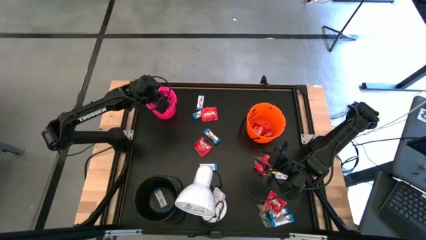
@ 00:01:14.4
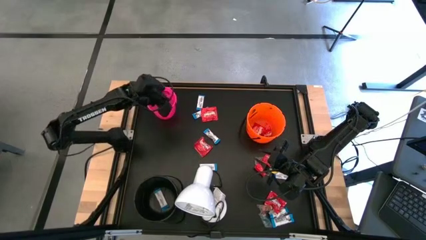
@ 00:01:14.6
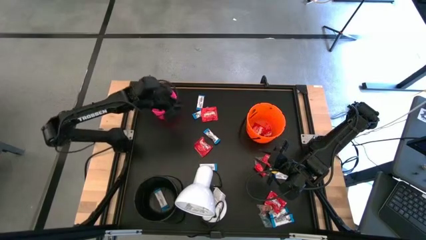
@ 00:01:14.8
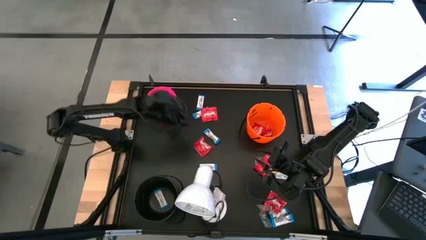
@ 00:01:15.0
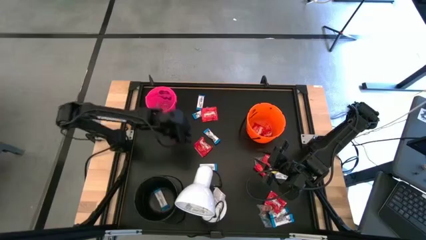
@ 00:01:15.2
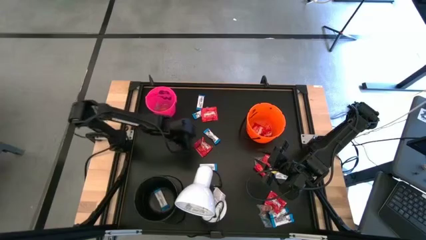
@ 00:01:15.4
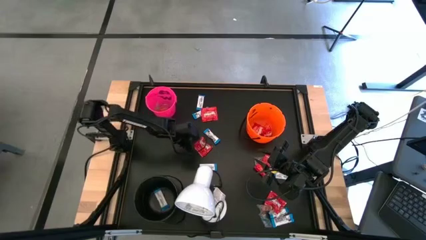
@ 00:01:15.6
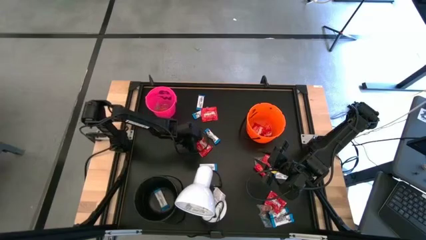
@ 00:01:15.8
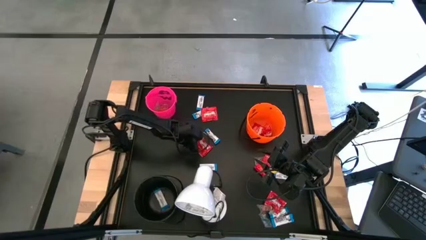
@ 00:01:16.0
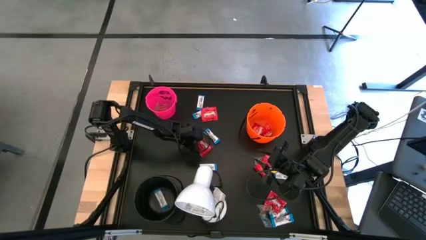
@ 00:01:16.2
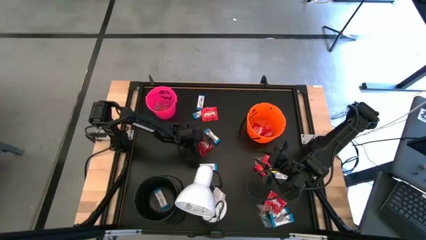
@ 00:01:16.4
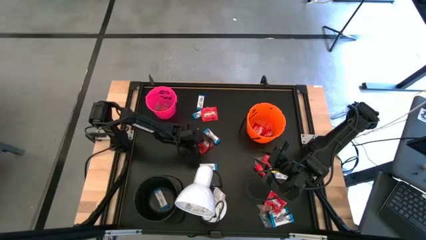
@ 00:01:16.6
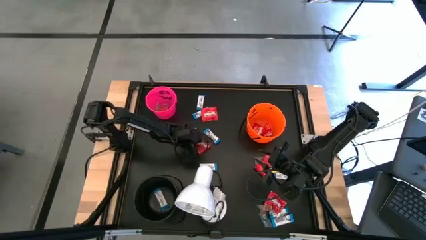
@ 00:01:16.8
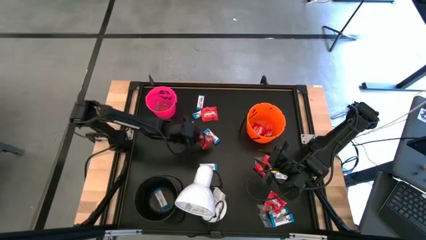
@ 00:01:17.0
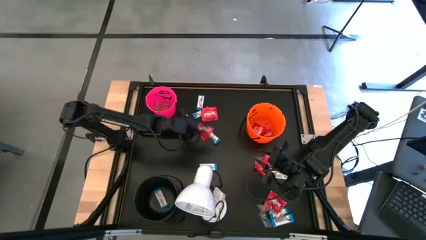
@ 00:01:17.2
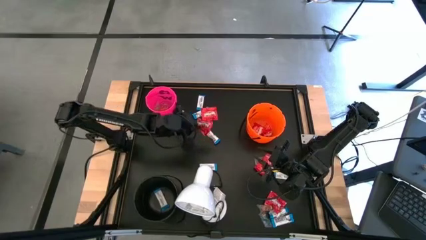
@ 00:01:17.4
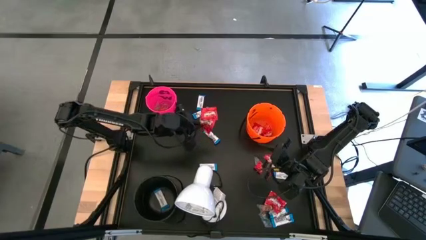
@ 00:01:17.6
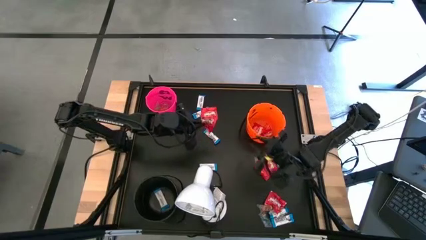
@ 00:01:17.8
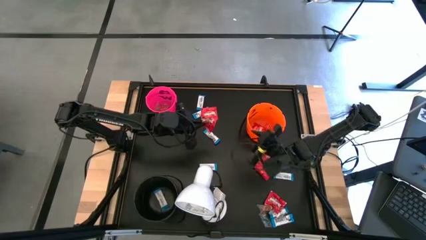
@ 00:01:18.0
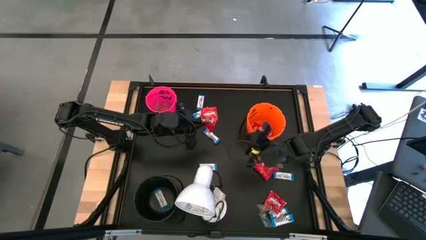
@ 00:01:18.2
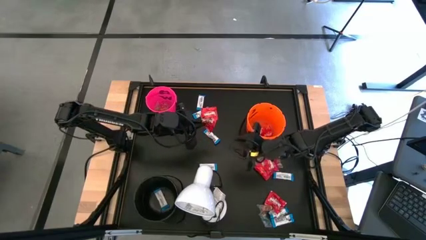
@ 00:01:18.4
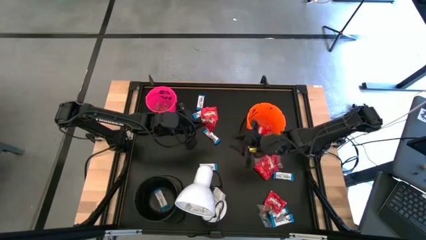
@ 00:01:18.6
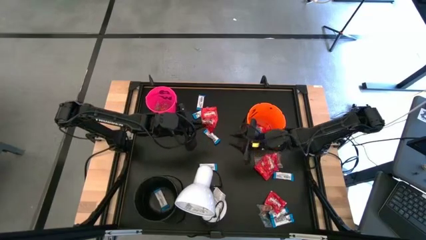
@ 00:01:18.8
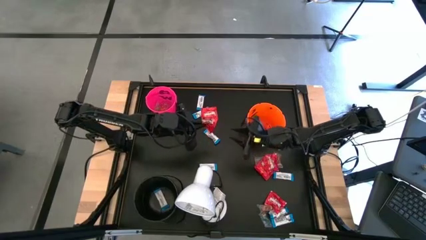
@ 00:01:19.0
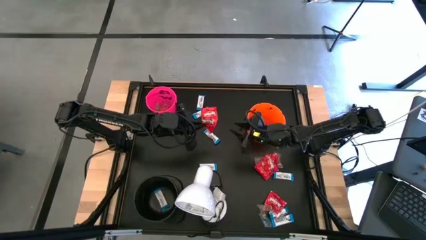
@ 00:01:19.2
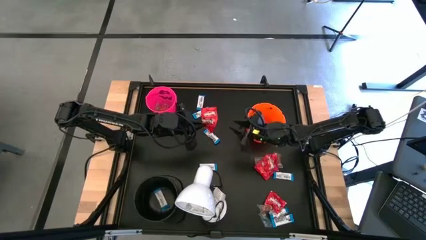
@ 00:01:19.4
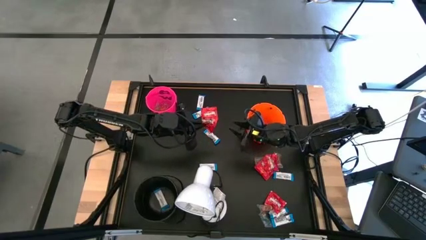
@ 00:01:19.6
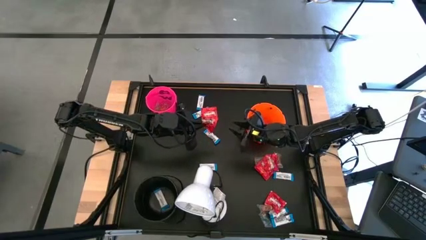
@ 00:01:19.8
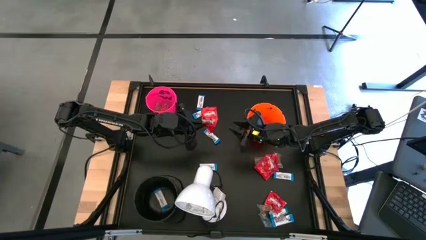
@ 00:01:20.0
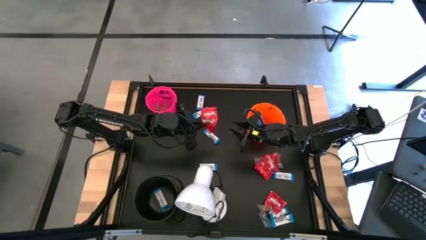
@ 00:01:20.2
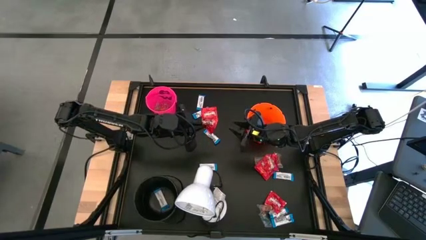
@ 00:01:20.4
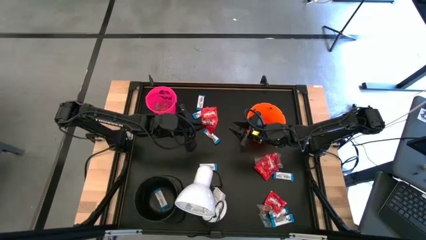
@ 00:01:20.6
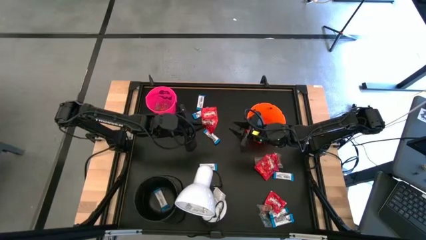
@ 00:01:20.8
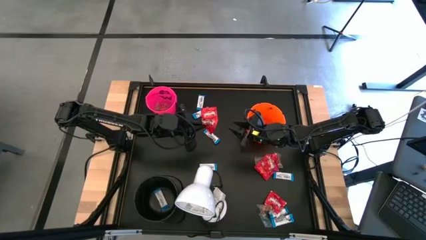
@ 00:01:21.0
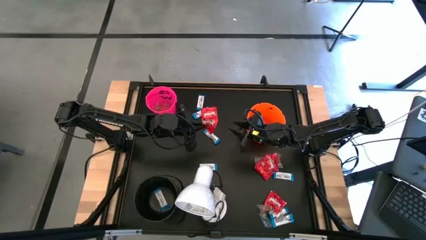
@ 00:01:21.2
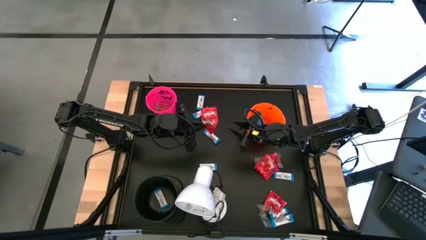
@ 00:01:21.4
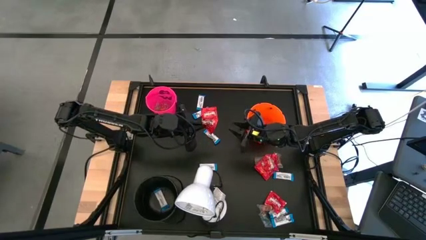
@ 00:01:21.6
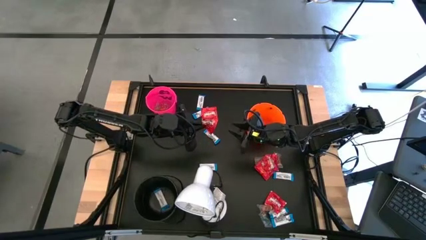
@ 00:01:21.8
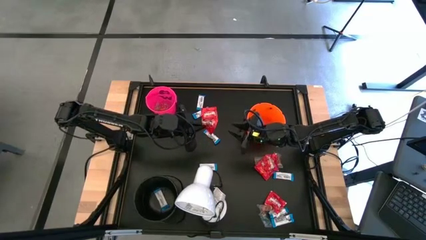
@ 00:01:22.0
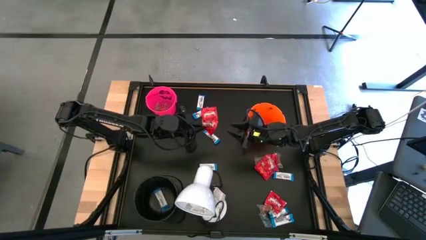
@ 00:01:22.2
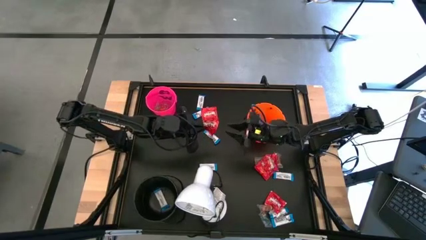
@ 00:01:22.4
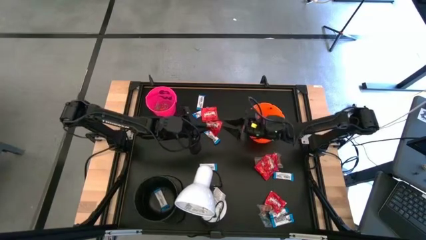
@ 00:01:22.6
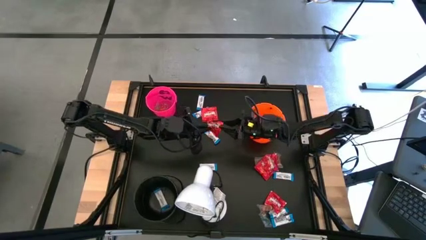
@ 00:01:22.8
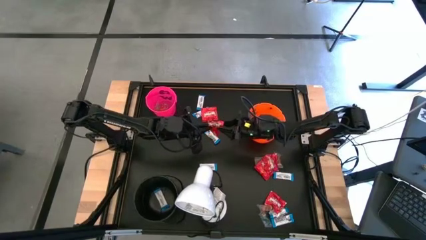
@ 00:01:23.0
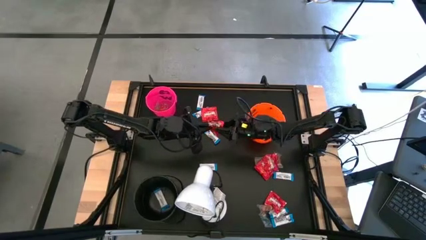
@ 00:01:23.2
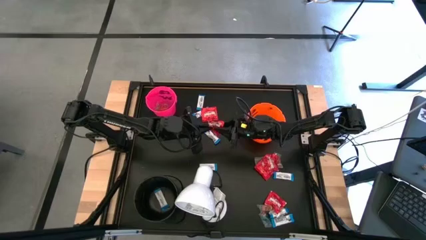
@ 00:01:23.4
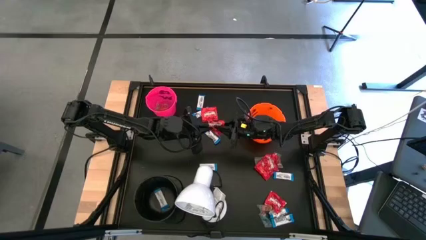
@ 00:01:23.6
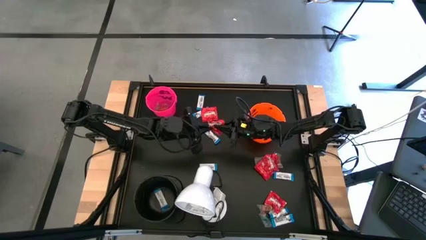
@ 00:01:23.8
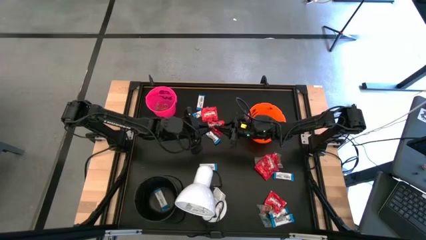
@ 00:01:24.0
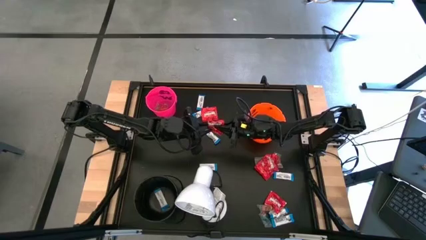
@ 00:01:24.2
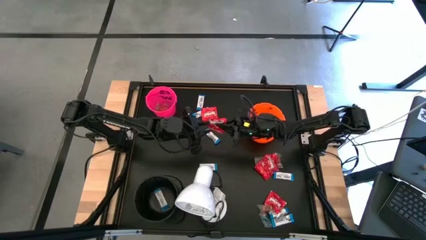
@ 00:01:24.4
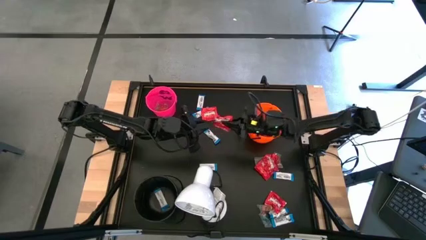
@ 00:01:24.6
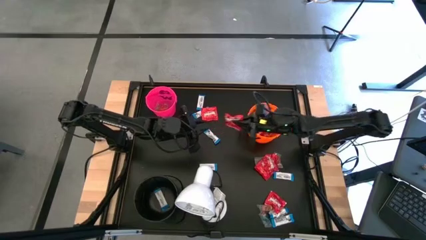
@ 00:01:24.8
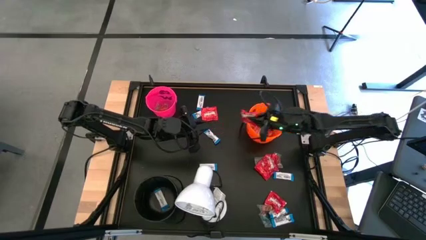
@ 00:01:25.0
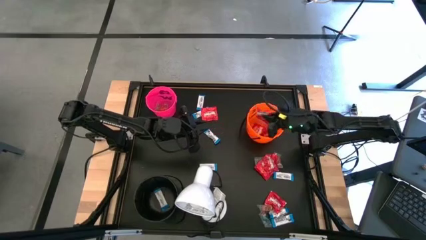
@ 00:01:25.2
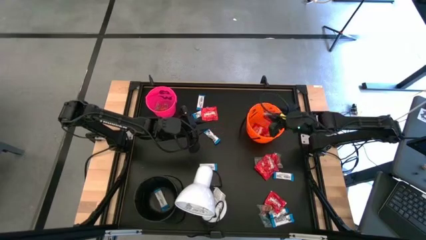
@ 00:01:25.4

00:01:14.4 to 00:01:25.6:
Task: Sort candy
Put the red candy into the orange bucket

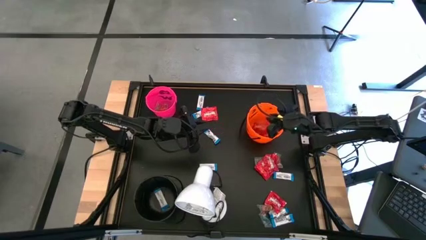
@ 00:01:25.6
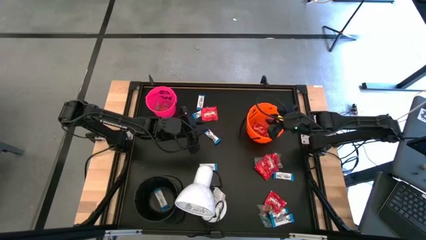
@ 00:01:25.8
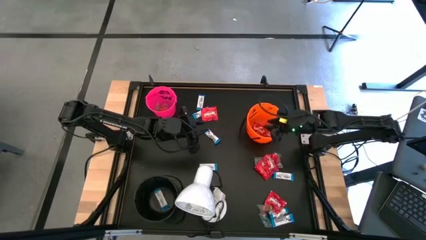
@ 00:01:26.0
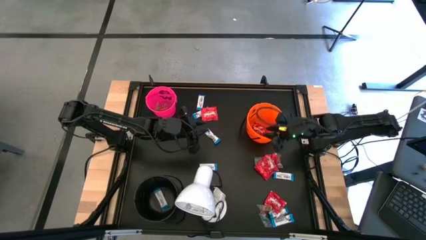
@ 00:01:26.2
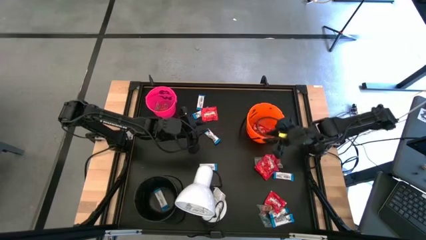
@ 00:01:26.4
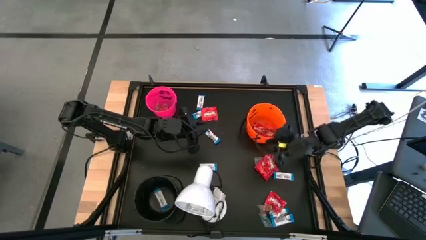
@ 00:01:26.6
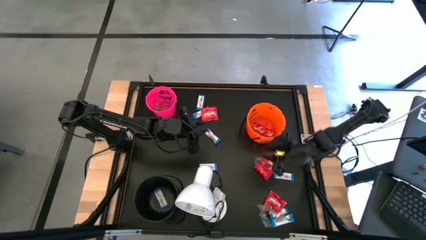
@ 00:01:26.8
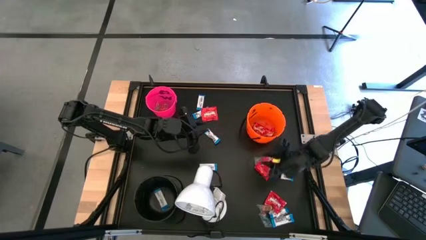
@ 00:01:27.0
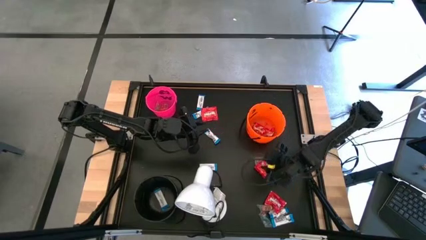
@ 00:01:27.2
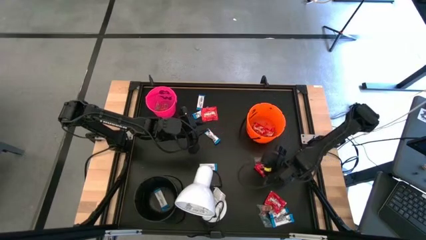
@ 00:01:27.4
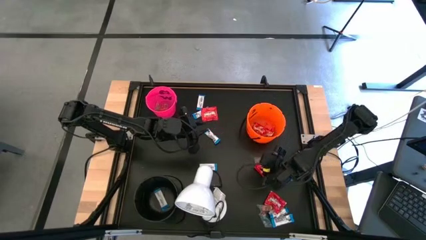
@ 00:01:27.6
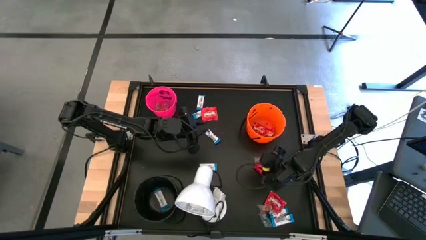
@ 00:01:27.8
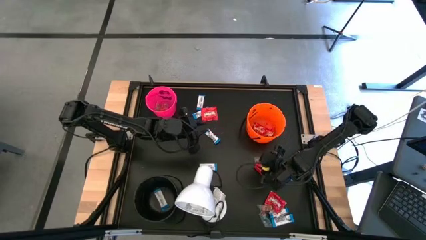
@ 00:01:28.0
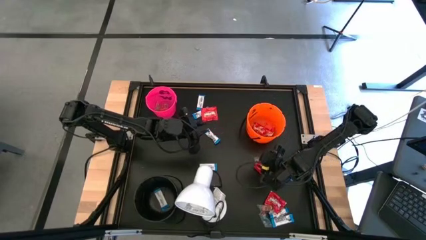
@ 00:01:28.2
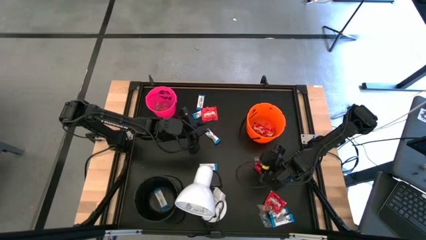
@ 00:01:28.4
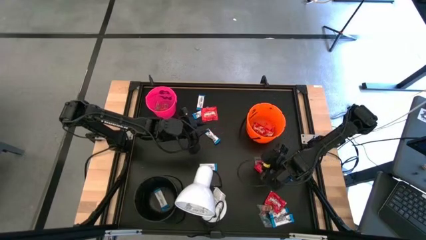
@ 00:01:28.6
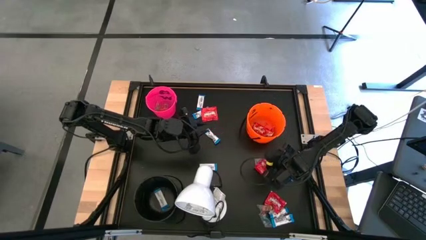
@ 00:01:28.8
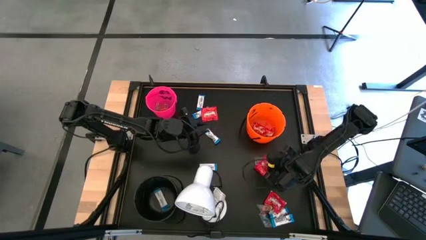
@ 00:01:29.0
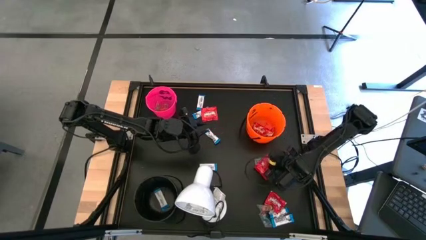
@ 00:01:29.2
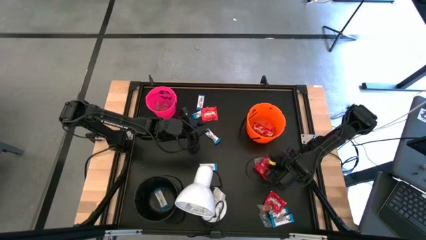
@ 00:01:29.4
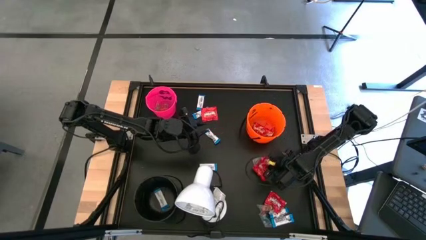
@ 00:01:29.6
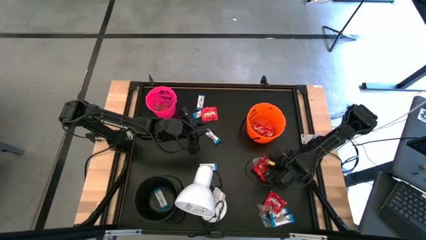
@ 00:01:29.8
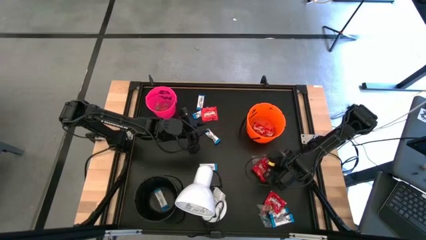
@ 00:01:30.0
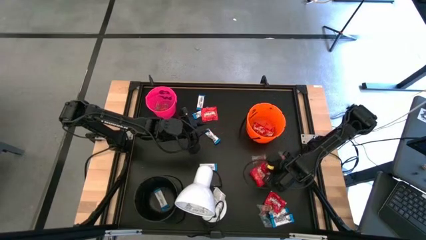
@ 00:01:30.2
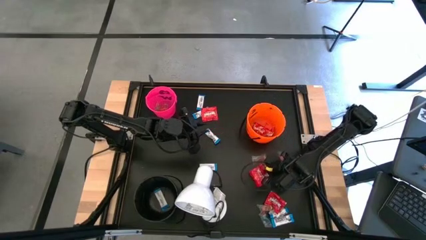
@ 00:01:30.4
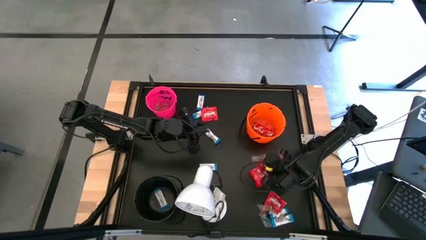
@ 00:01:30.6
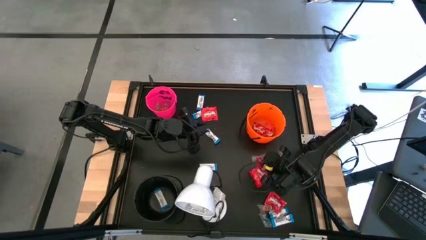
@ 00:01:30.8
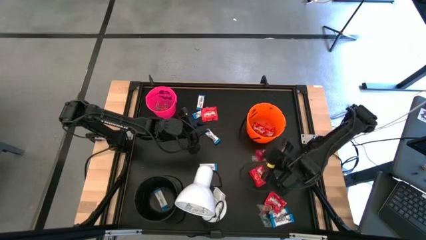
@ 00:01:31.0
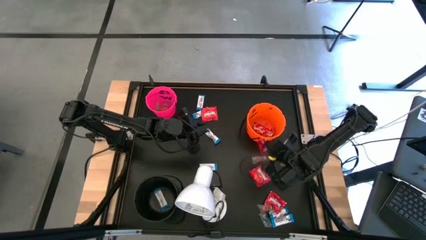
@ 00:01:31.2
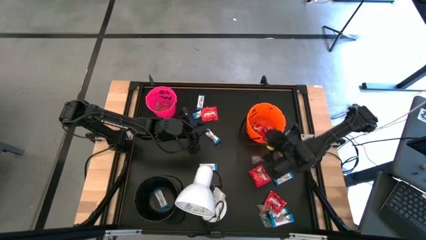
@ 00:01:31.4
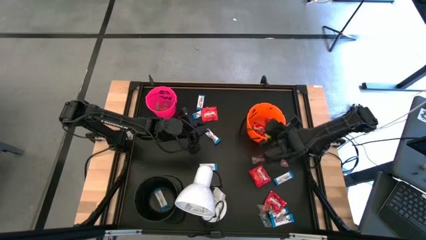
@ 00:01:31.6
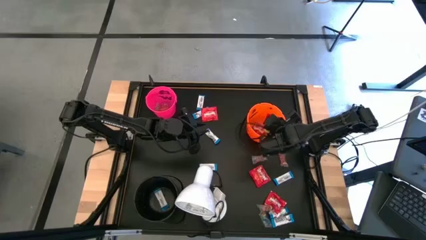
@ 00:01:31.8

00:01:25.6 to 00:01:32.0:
Put the red candy into the orange bucket
